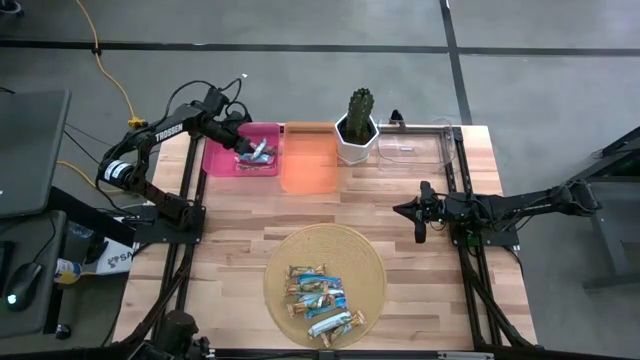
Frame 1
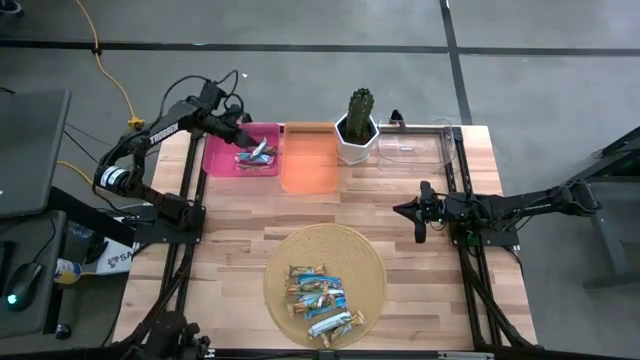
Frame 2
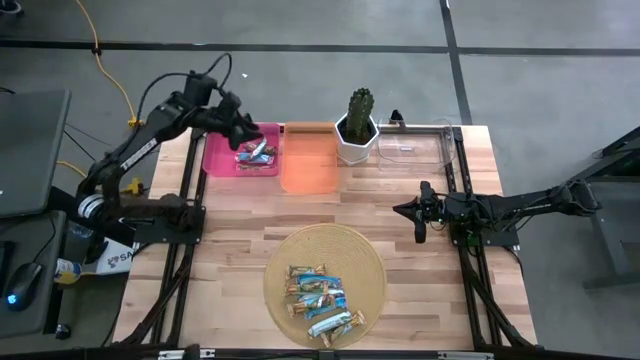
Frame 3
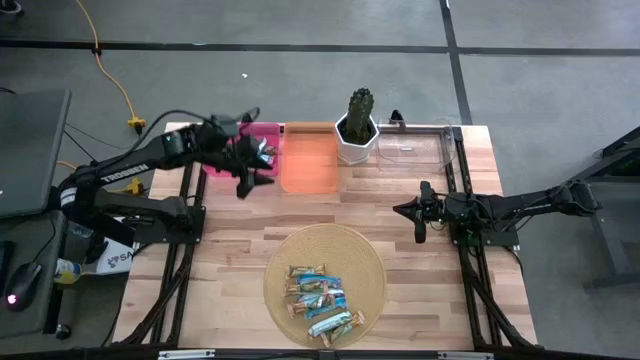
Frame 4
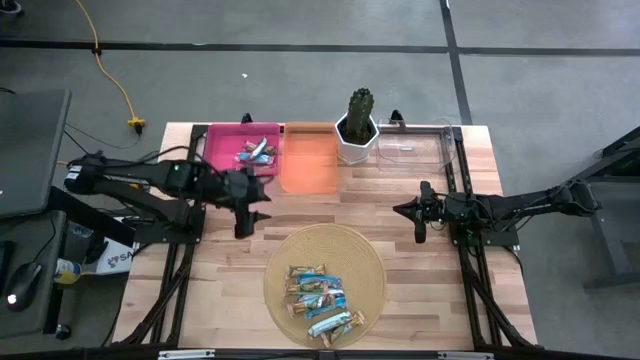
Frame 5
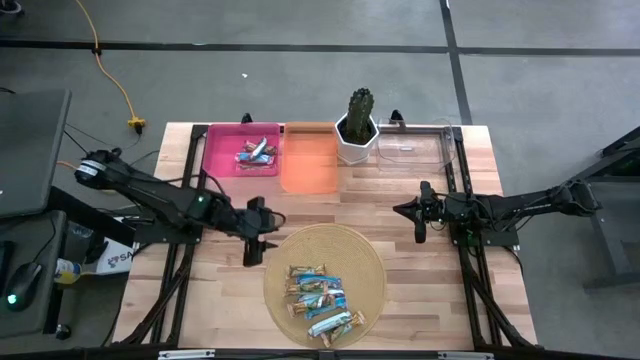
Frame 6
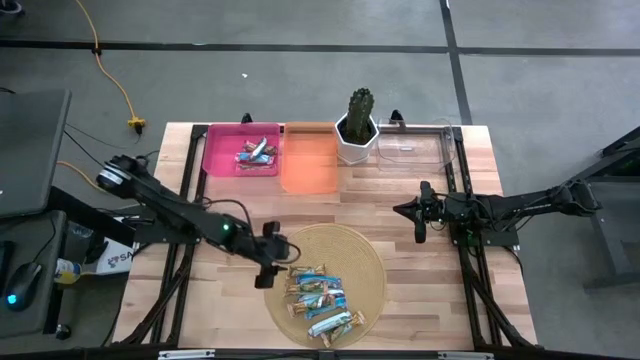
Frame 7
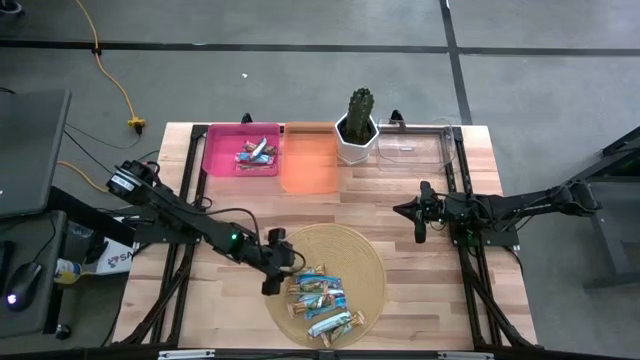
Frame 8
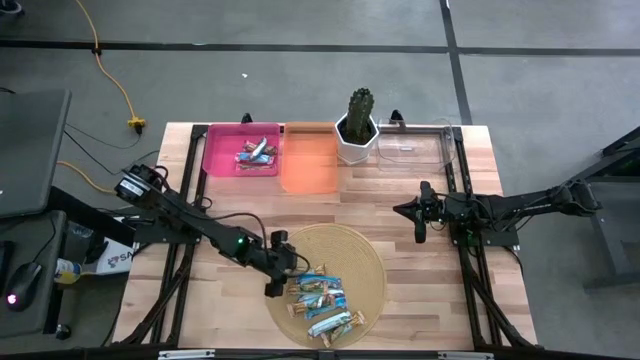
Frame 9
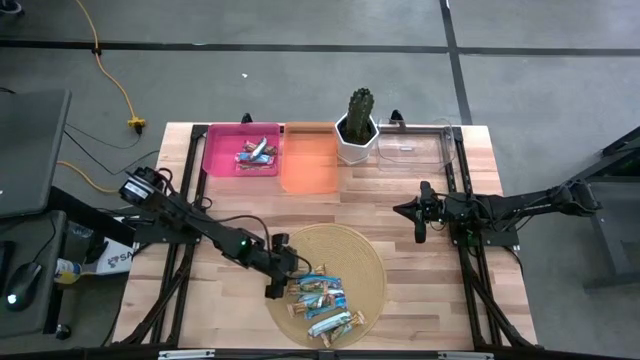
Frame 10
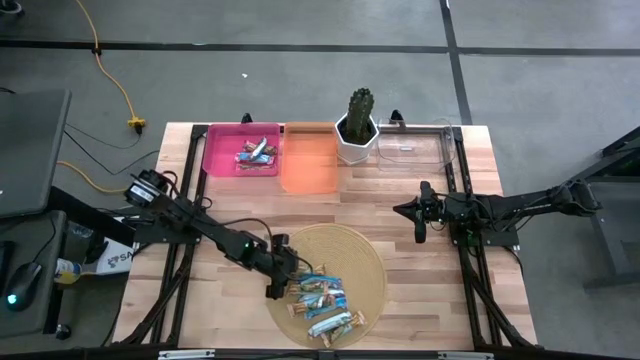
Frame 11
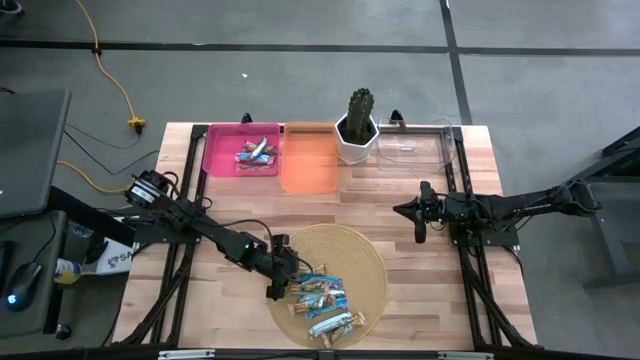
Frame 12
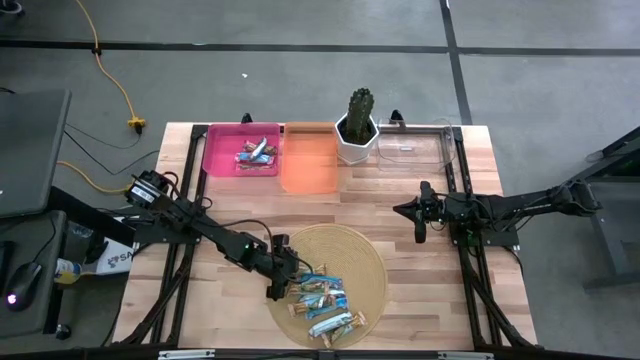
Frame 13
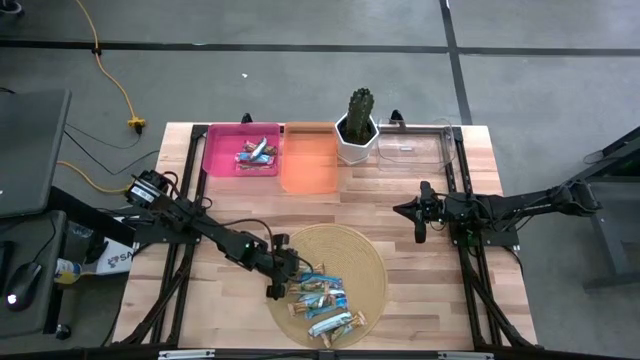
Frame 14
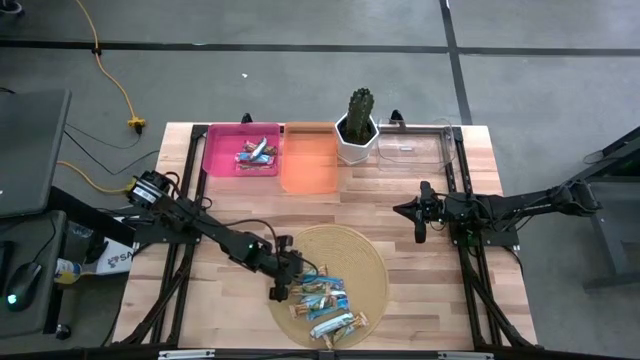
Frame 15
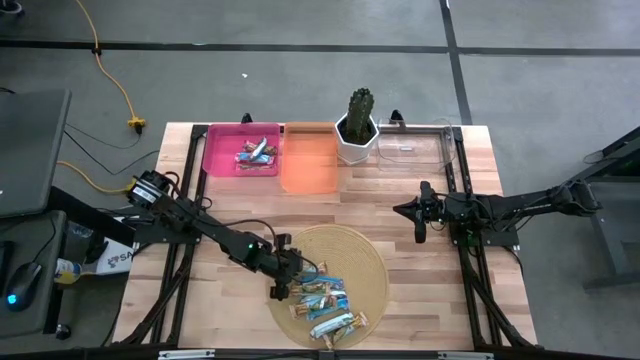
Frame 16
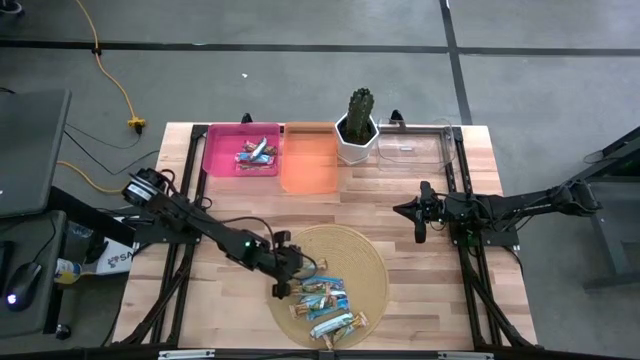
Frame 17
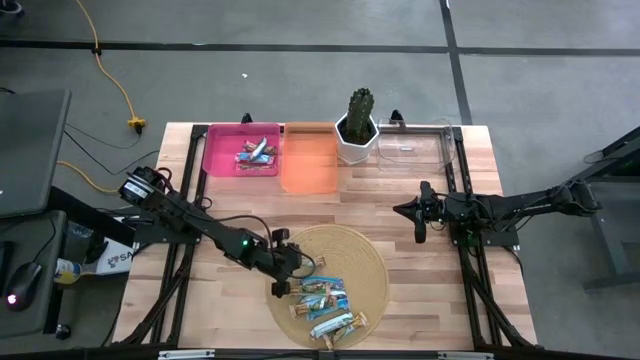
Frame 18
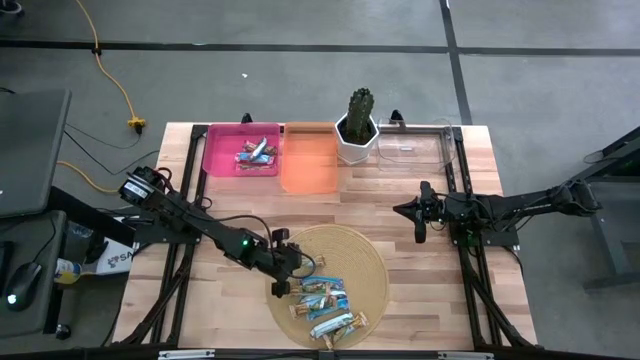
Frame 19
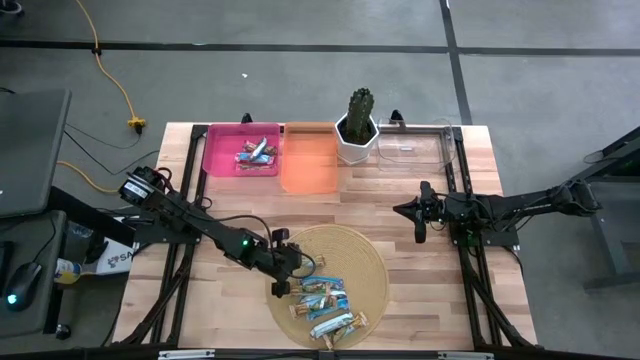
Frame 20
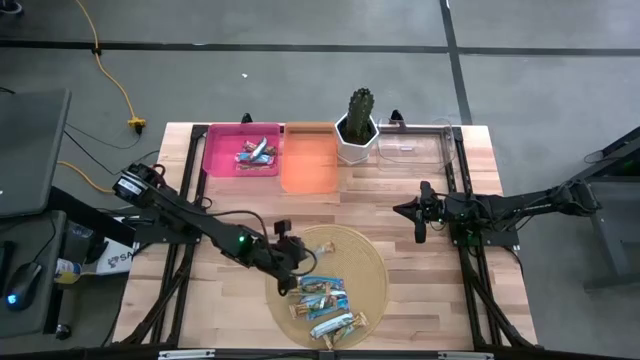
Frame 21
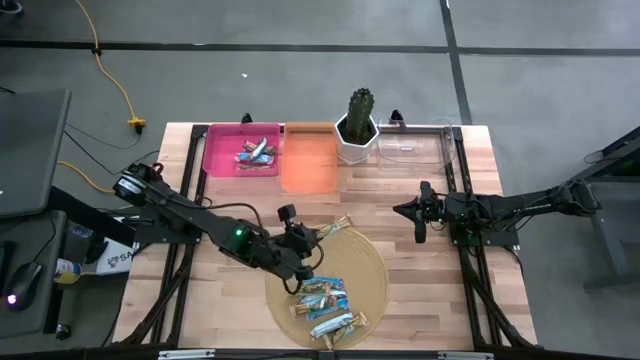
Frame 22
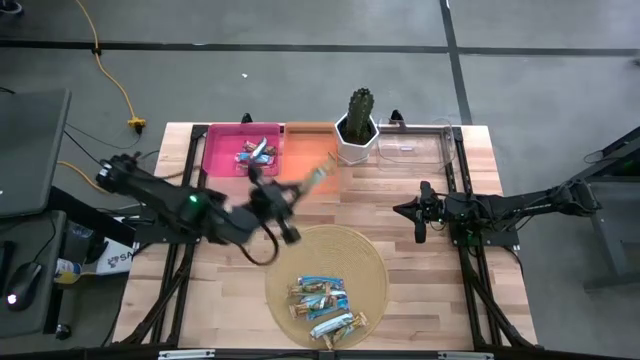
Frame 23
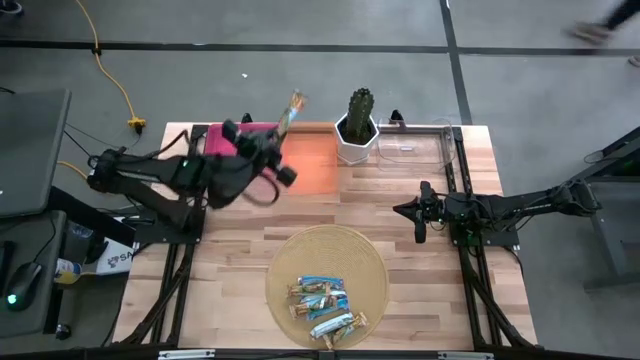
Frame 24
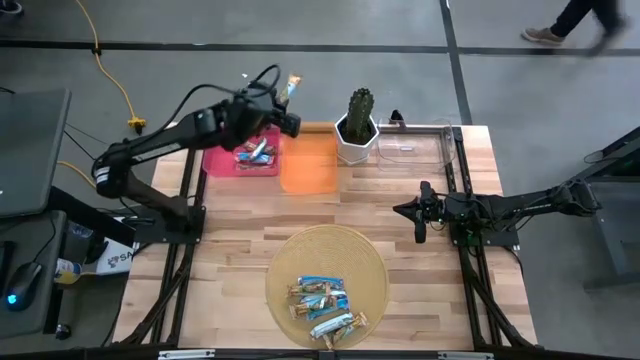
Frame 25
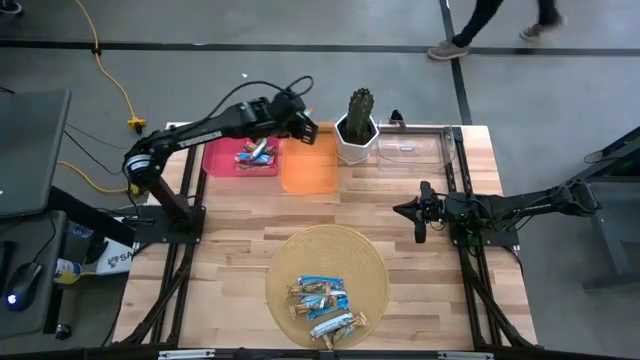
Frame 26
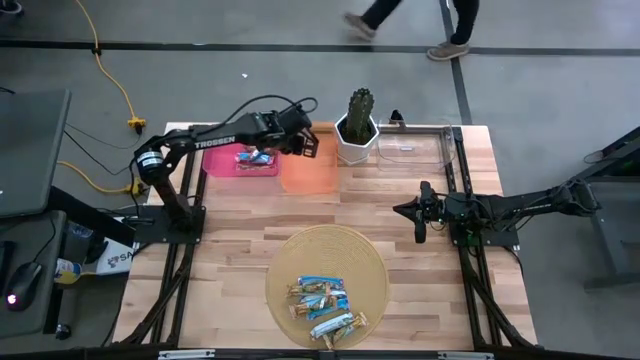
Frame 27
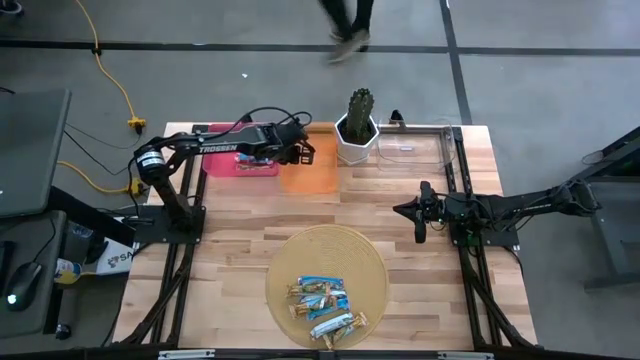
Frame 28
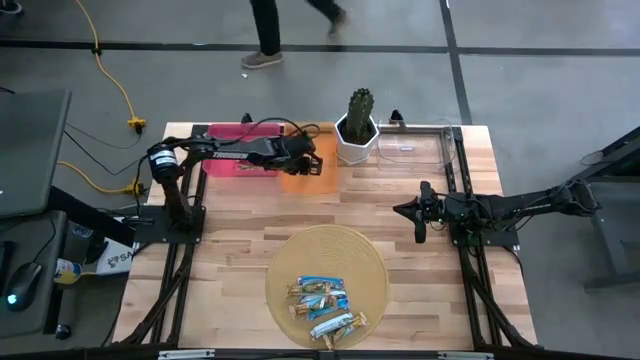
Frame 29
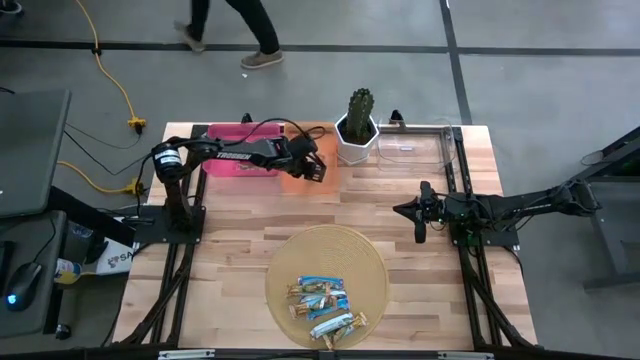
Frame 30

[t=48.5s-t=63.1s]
Task: Pick and place Granola Bars by type
Put the yellow granola bar into the orange bin
